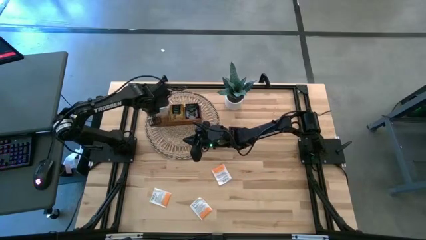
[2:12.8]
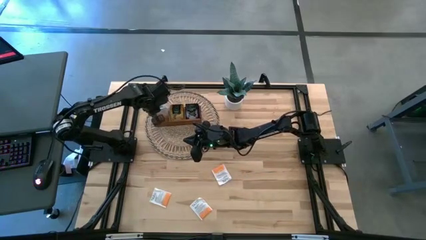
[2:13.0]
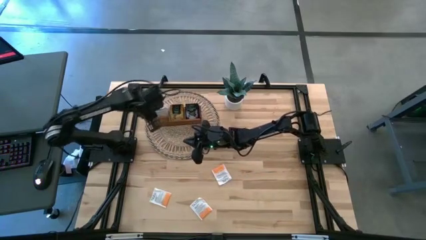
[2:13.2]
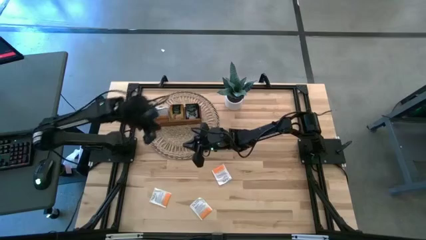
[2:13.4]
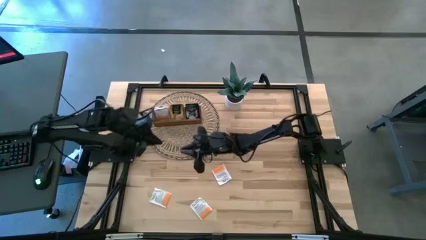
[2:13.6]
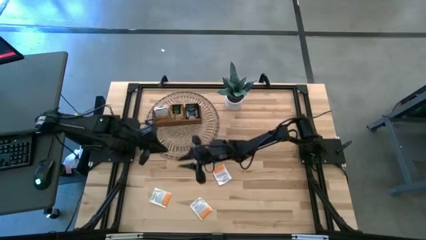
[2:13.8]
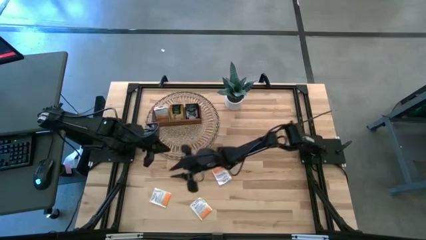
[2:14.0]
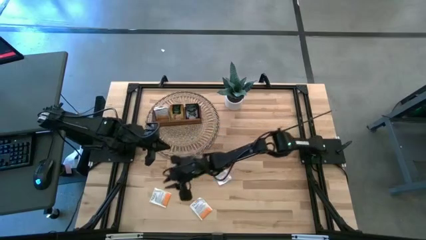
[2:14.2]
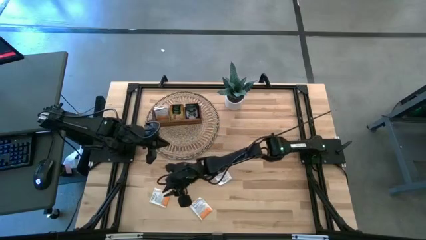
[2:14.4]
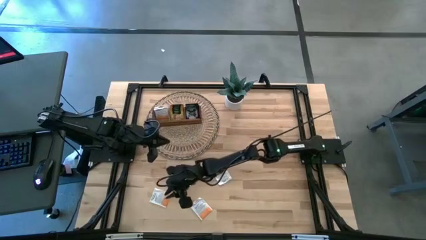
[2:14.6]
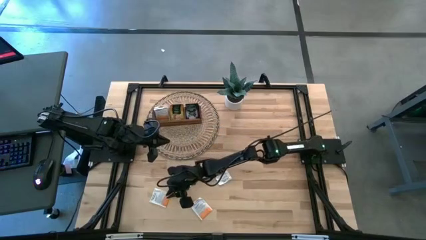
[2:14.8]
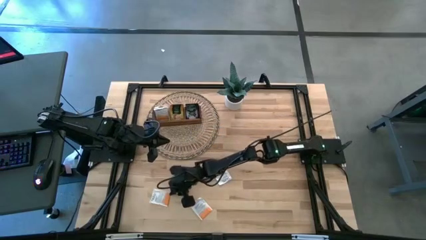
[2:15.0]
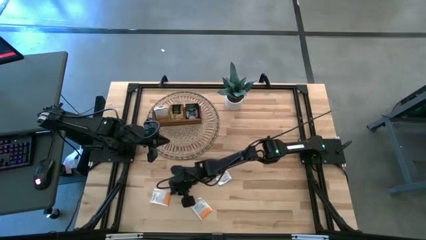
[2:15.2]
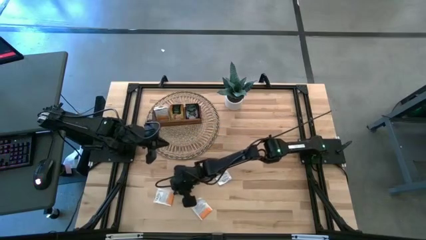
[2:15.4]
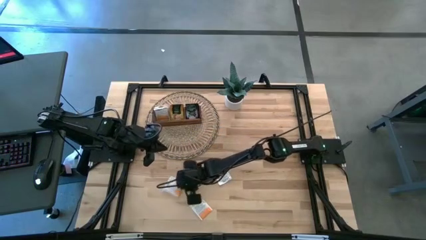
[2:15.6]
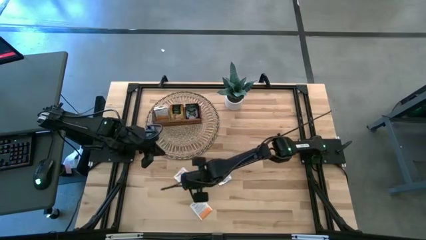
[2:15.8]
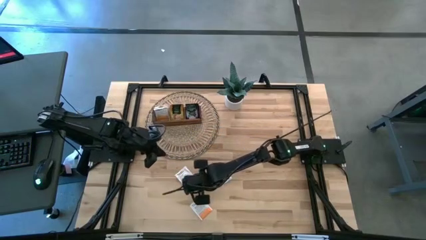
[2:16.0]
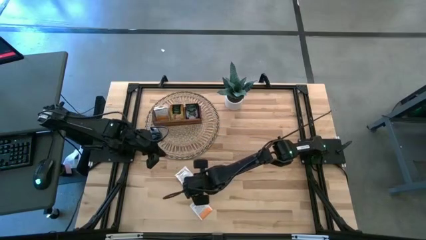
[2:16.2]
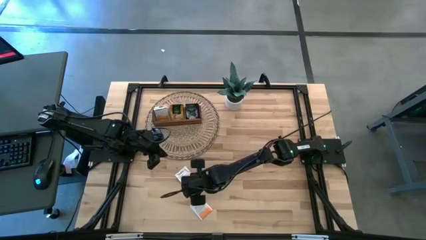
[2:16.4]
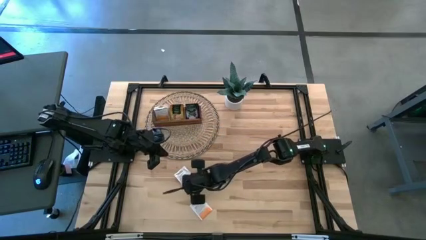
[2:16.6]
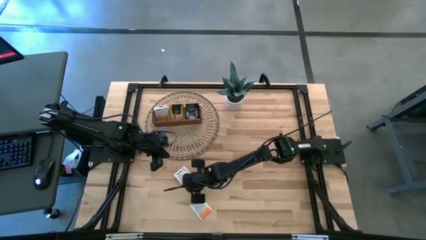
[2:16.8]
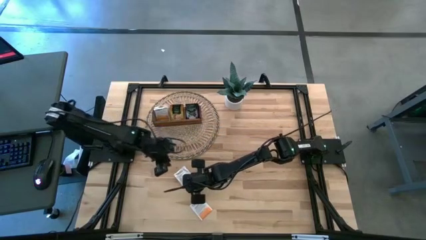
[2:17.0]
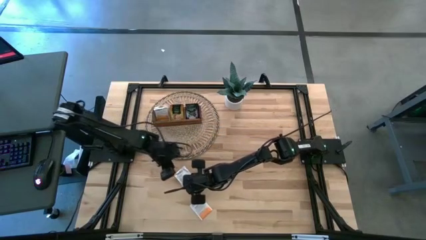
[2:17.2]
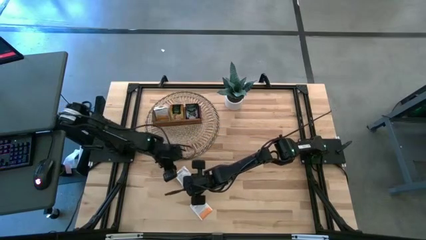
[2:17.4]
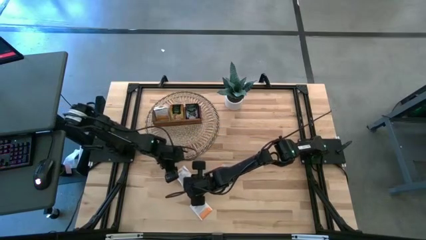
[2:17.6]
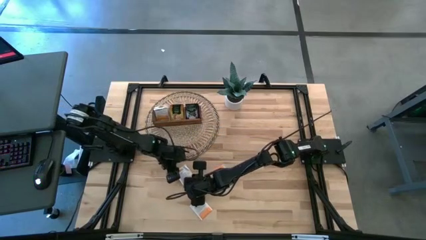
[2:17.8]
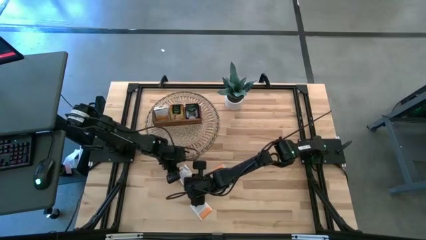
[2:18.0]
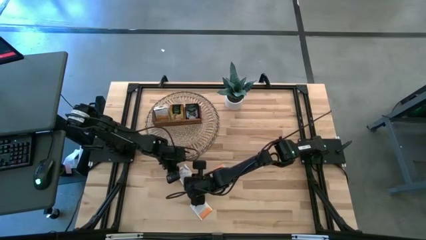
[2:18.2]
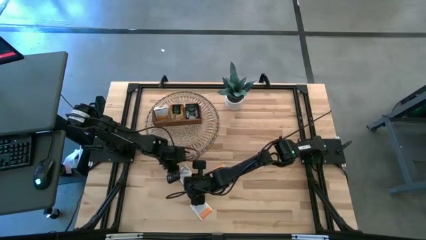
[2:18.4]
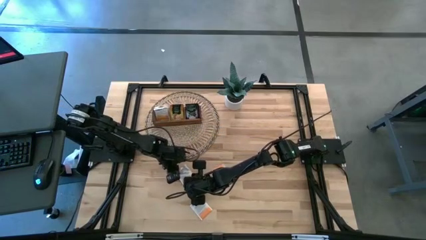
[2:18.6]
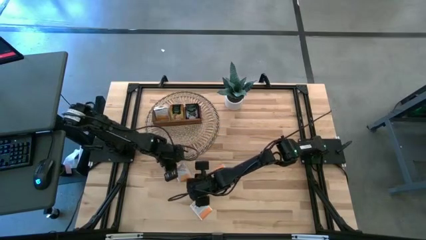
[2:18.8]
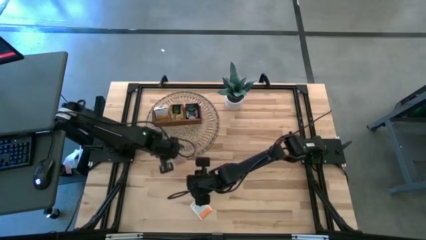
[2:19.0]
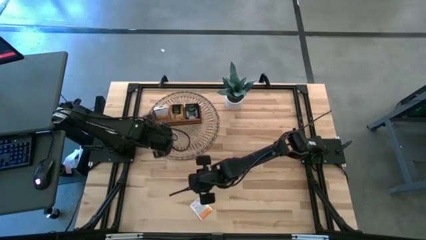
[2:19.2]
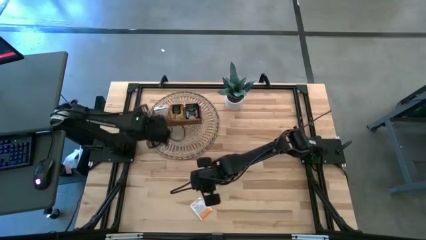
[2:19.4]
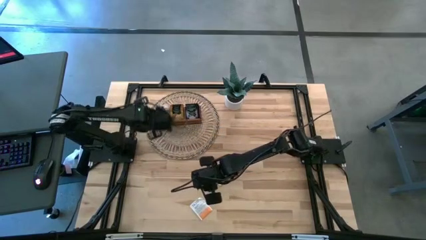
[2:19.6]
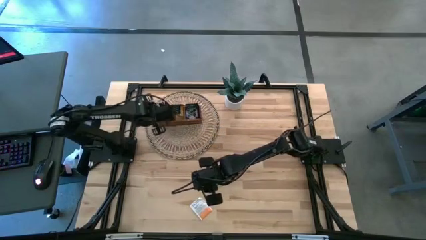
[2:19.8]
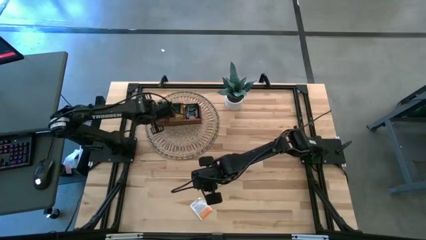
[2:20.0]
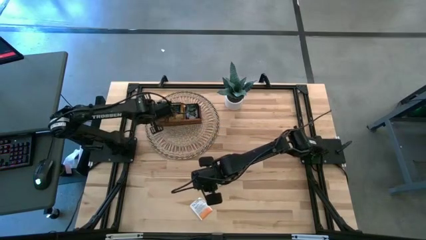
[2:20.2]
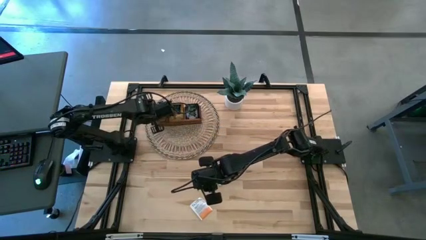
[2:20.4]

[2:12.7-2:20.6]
Task: Pick & Place Tea
Put the white tea bag into the left section of the wooden organizer

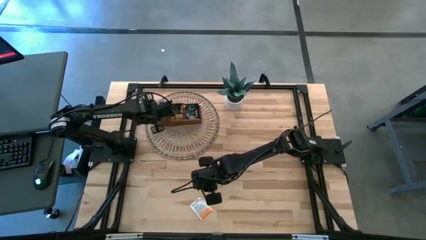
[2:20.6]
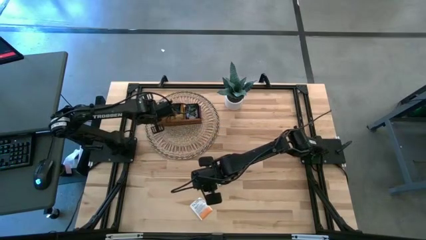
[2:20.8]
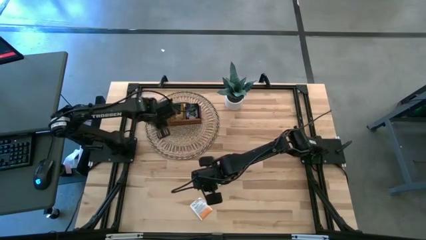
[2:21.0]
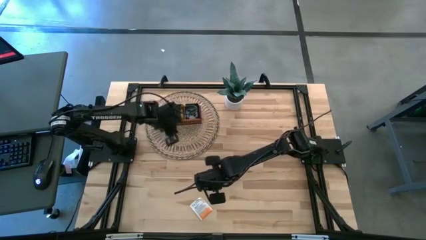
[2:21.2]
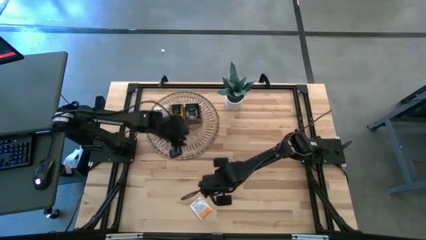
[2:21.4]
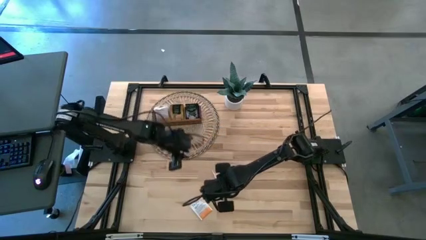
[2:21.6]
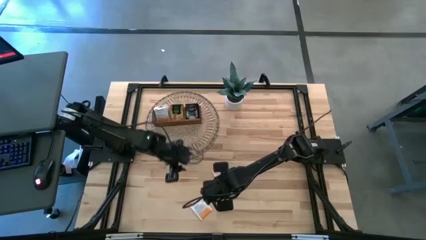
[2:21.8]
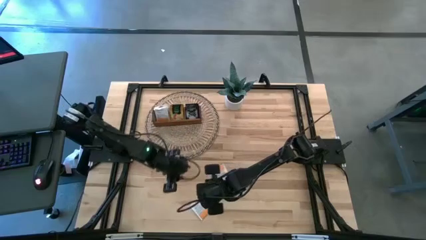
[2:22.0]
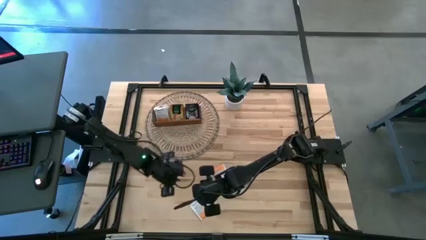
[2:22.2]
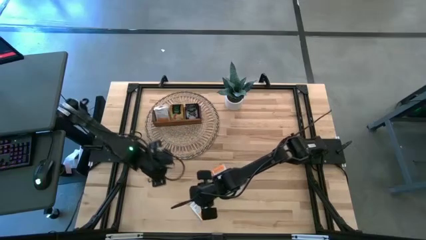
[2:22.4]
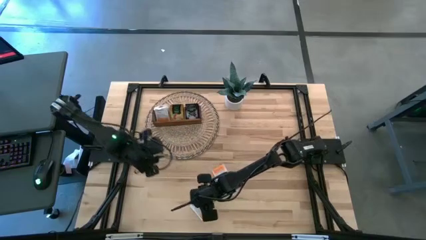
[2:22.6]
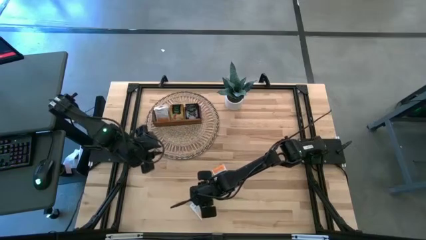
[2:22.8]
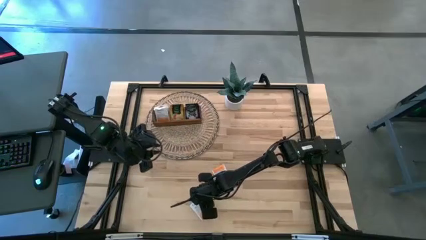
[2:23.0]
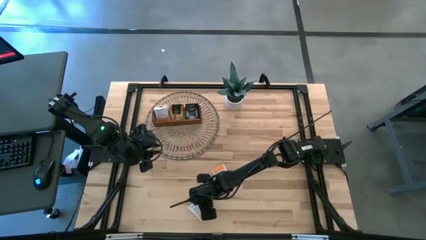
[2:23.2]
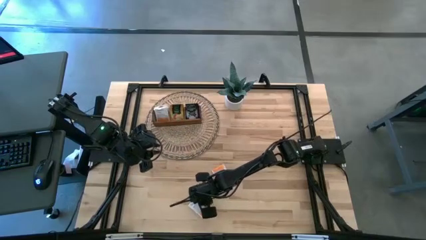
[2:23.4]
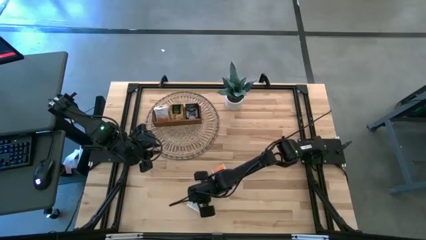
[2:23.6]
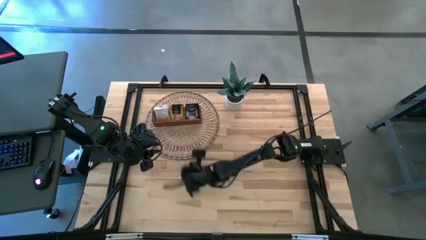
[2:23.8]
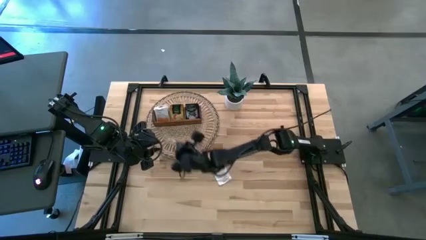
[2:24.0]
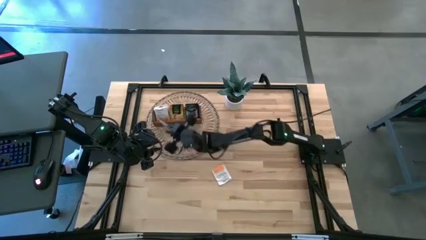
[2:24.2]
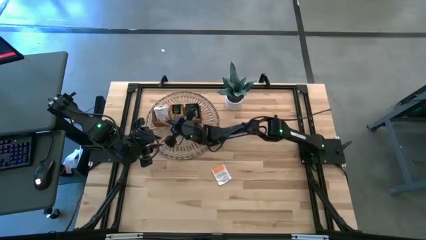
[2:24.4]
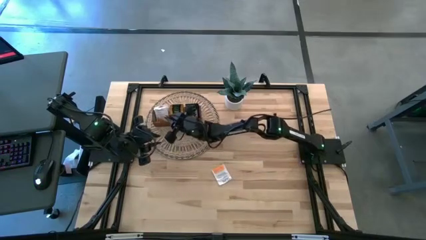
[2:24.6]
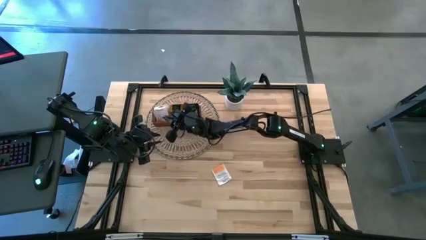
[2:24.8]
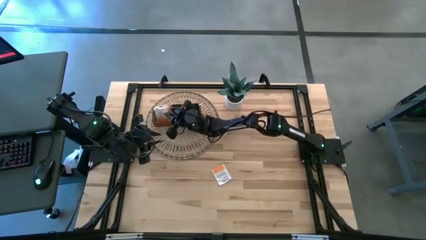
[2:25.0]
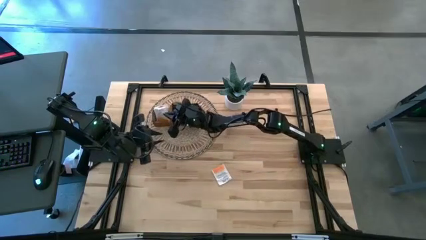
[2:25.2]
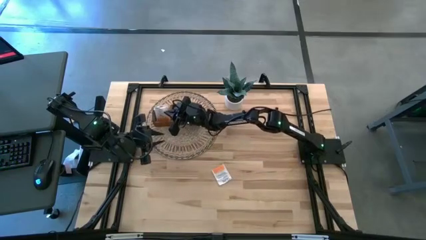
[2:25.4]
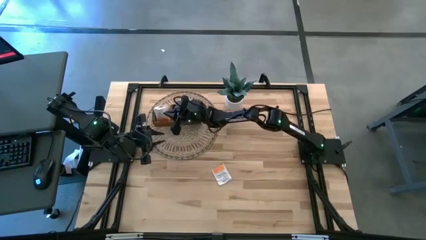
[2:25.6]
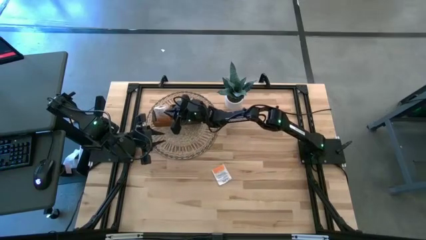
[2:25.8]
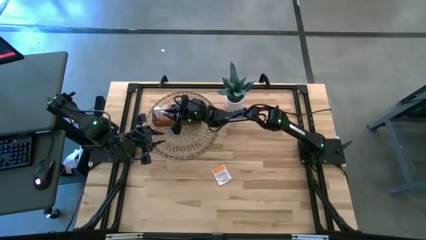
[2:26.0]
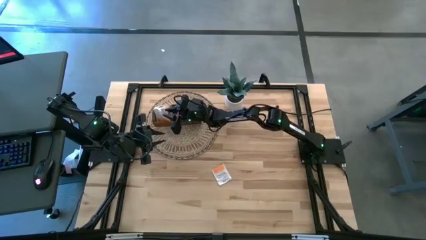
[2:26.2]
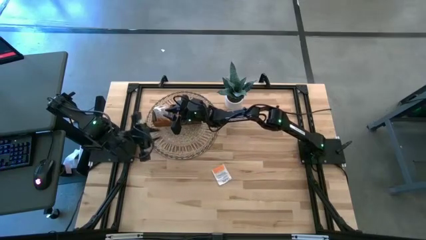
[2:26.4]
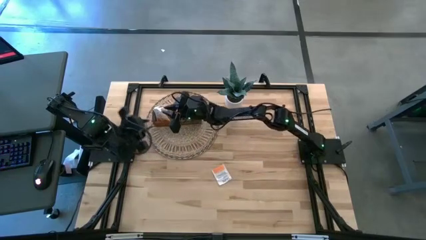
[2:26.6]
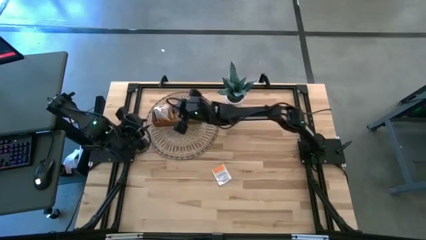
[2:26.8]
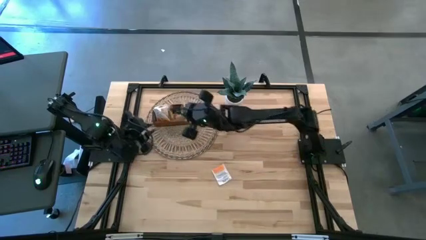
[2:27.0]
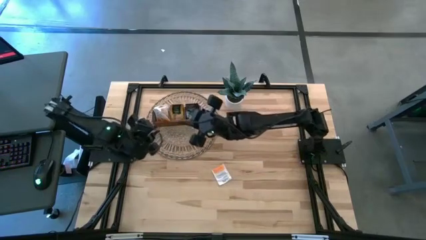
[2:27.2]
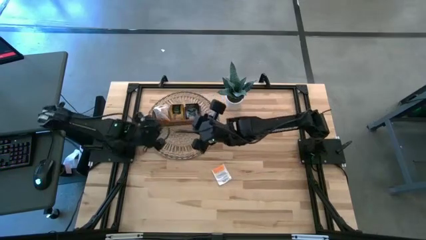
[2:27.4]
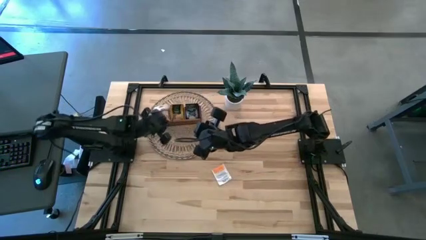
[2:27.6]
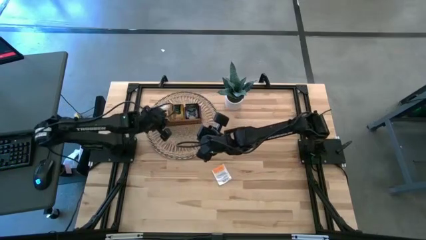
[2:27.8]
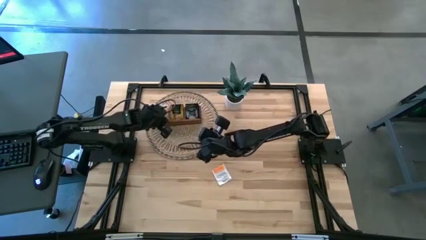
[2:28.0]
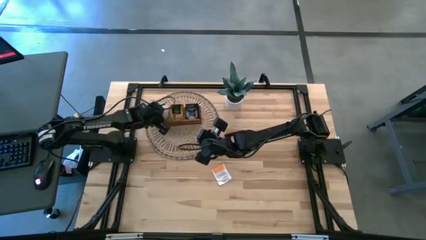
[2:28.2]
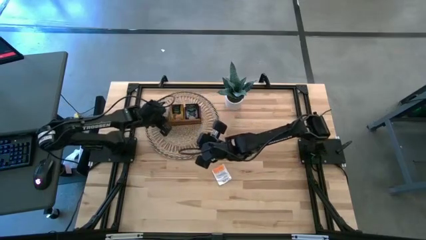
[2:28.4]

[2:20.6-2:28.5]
Put the white tea bag into the left section of the wooden organizer
